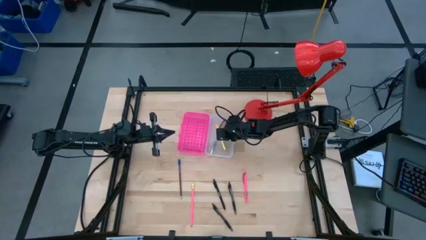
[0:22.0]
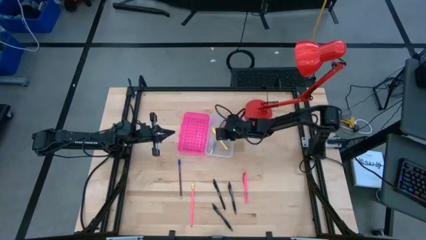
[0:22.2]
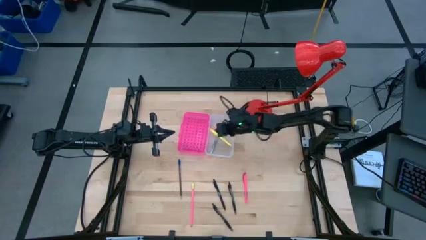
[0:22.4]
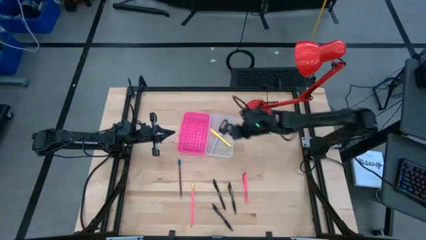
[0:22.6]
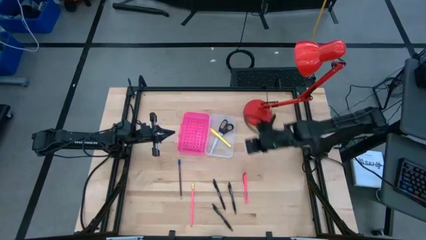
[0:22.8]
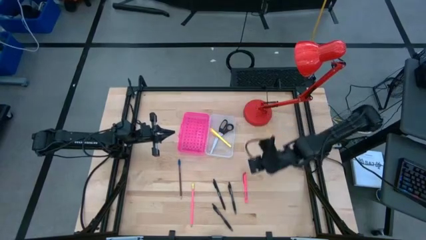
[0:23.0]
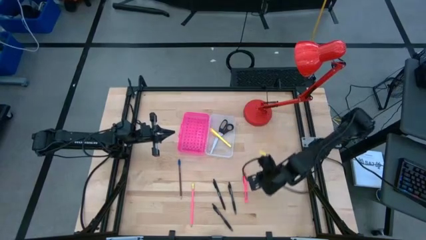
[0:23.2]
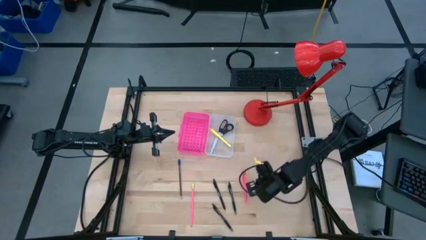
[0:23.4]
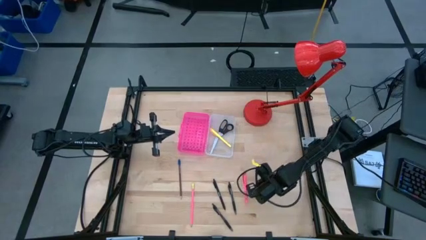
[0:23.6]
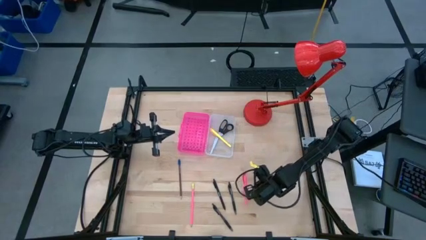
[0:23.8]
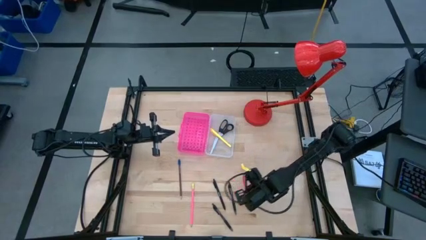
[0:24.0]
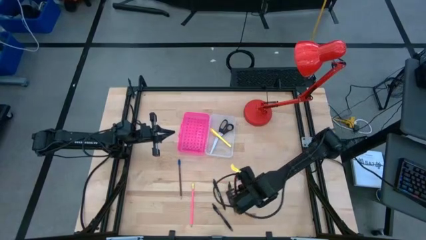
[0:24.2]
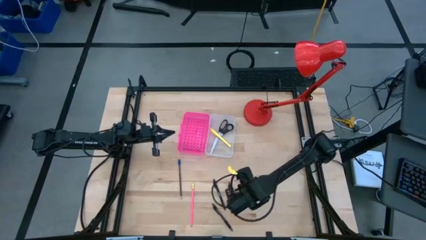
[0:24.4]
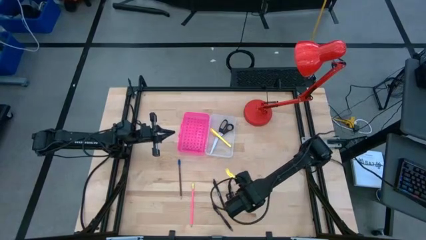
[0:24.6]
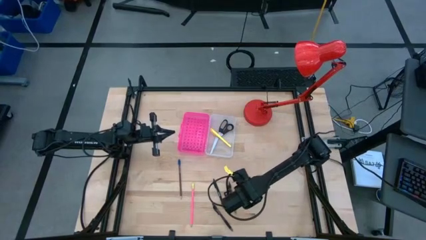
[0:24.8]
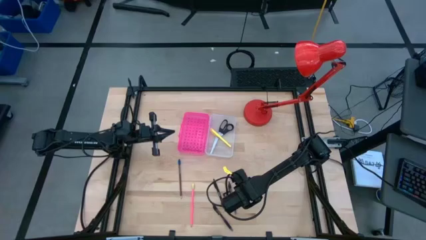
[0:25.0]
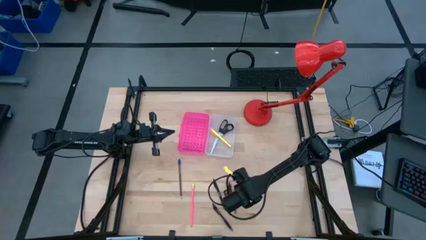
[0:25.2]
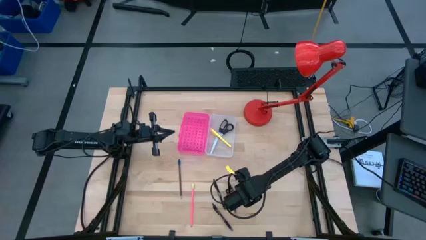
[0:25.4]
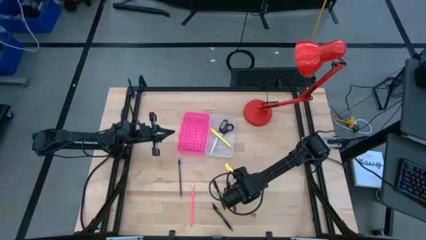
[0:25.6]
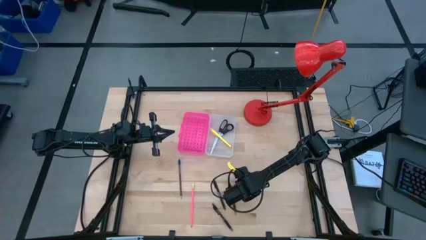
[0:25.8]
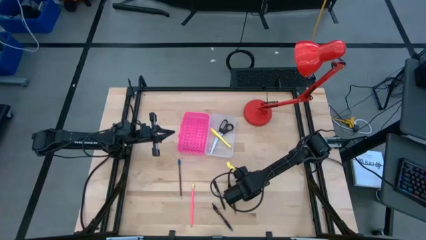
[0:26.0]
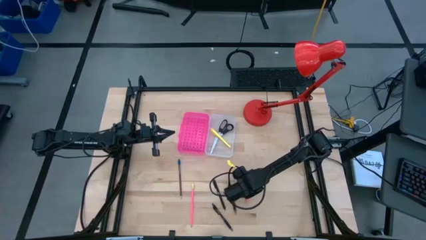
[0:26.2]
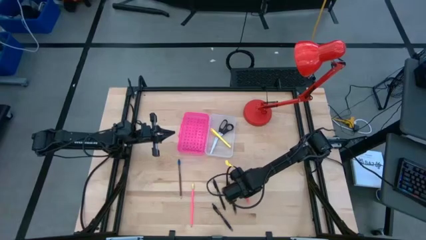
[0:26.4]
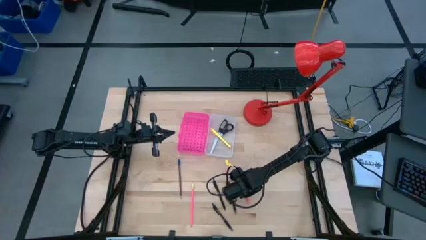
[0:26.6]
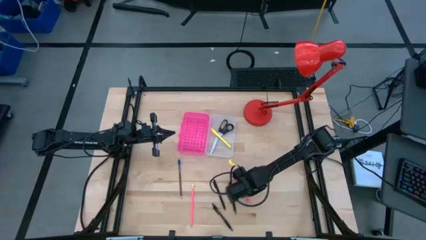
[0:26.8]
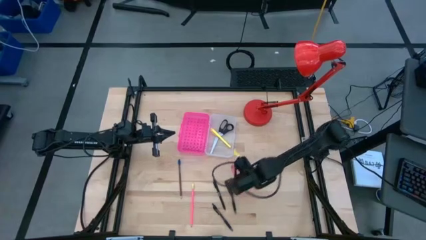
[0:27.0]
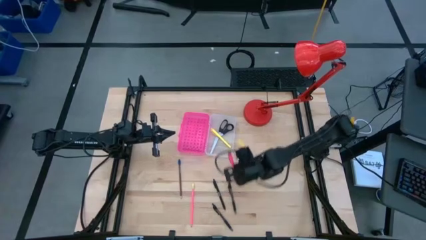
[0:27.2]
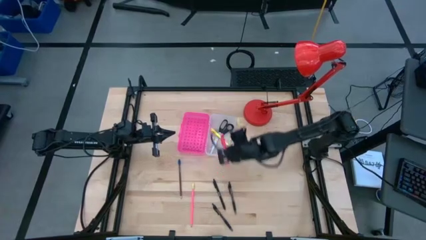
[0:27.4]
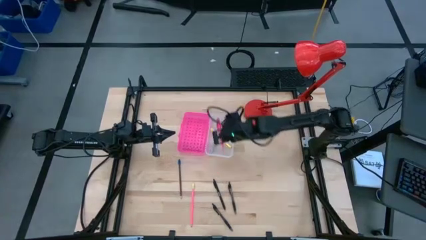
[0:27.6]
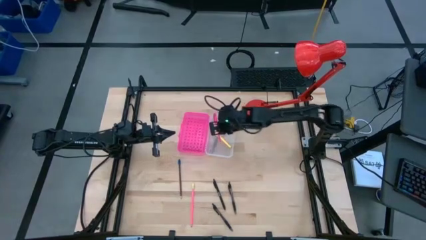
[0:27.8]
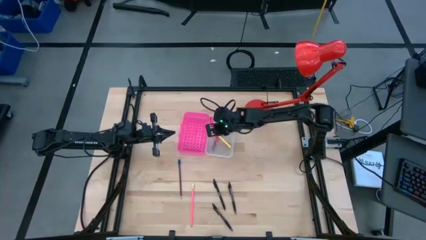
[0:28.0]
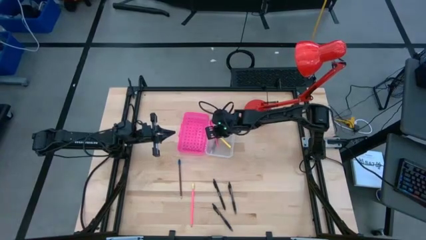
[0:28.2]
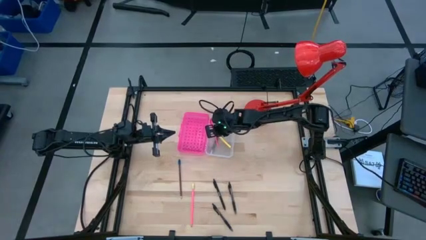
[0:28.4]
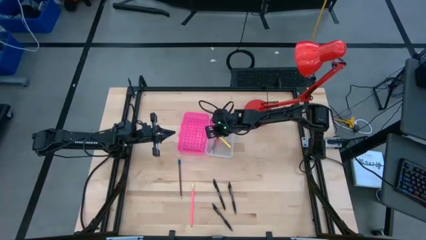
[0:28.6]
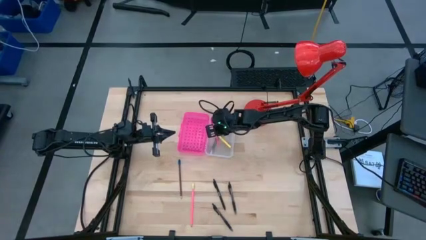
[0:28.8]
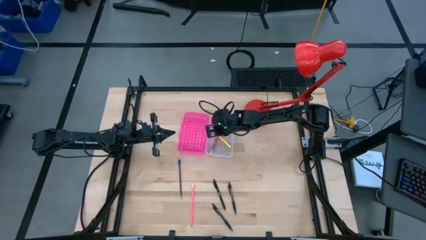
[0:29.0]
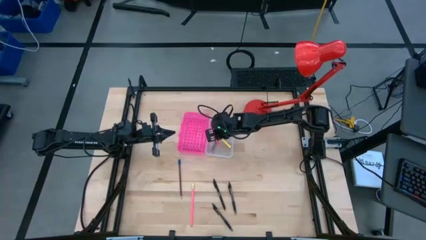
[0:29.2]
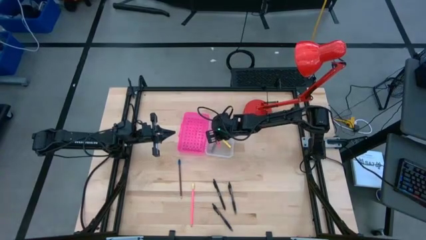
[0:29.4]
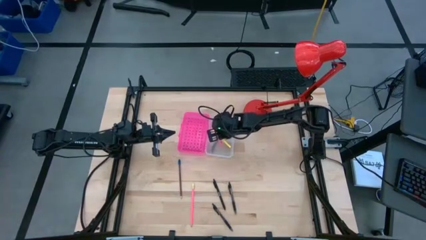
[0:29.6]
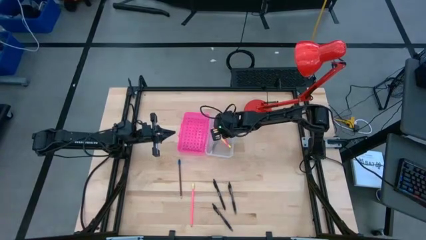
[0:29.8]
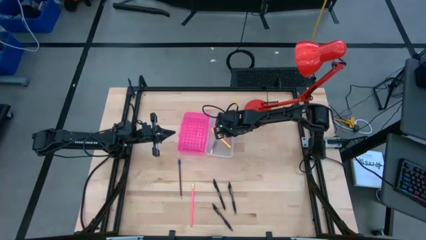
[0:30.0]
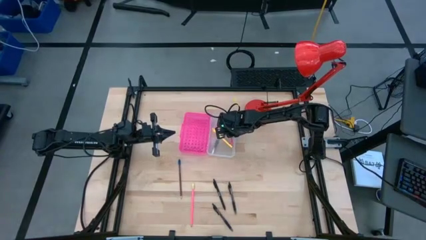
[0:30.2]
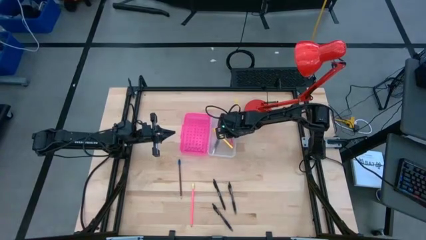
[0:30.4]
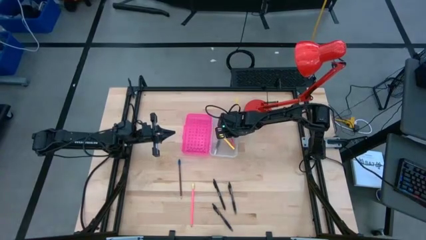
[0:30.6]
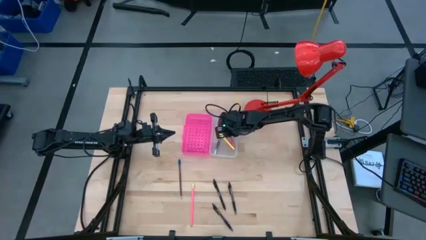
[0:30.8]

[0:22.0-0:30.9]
Task: Pick & place school supplies into a supply box
Put the pink ballpen into the pink supply box

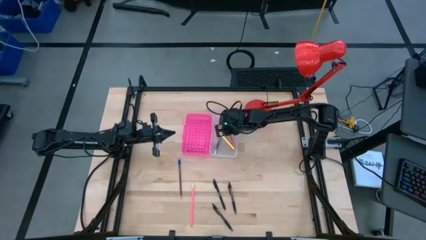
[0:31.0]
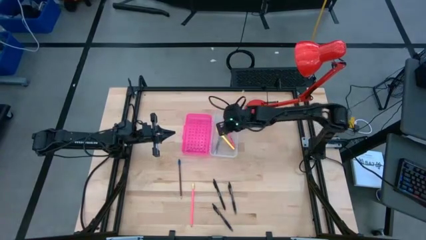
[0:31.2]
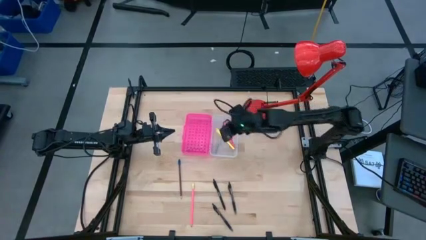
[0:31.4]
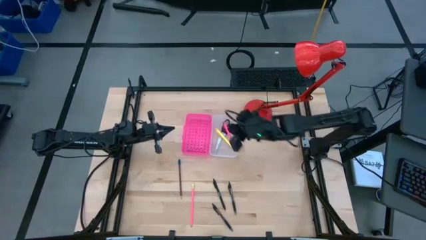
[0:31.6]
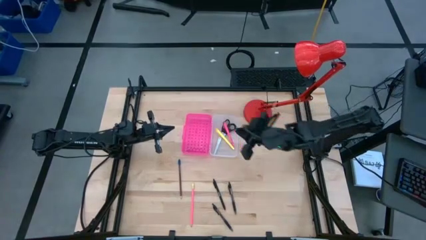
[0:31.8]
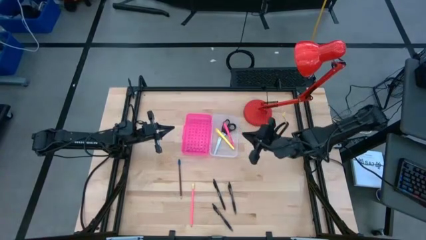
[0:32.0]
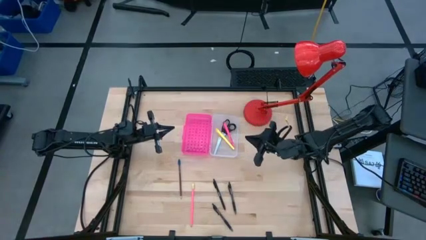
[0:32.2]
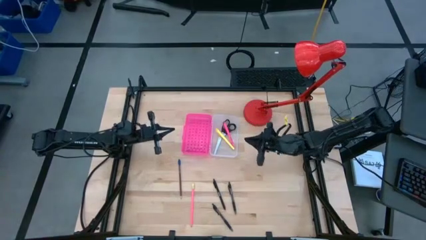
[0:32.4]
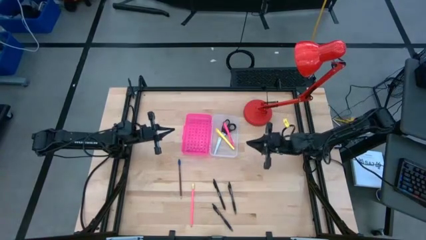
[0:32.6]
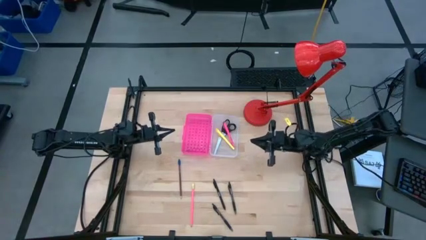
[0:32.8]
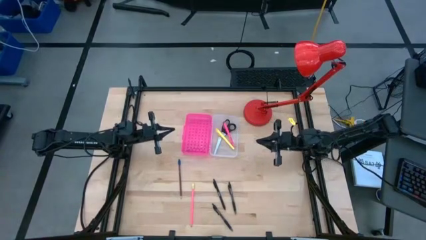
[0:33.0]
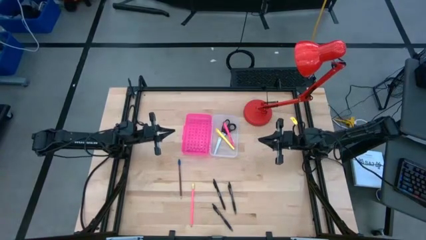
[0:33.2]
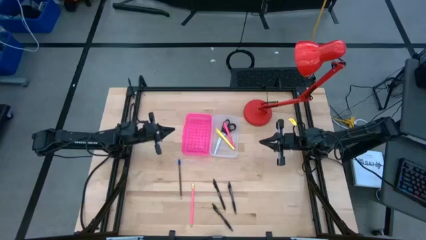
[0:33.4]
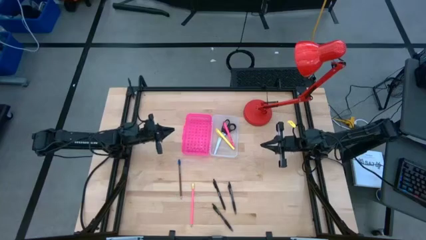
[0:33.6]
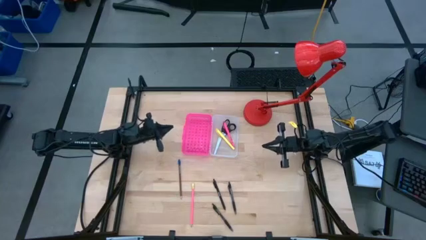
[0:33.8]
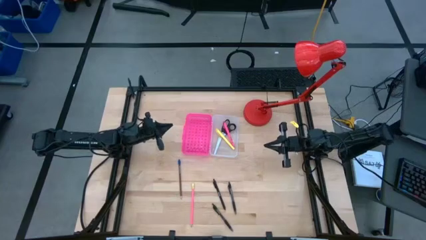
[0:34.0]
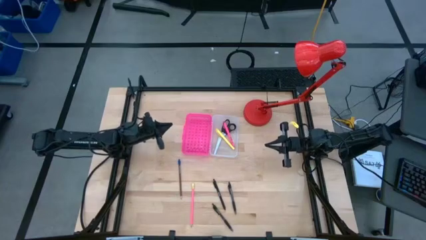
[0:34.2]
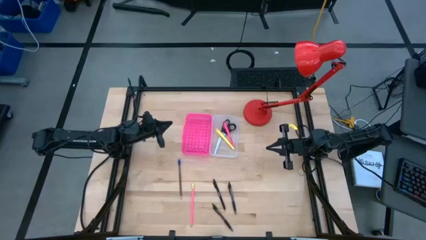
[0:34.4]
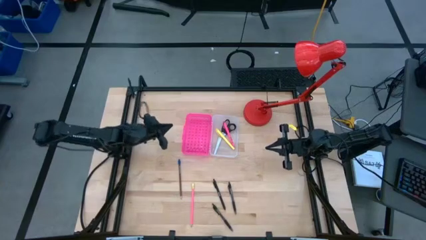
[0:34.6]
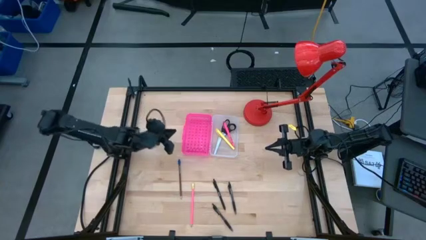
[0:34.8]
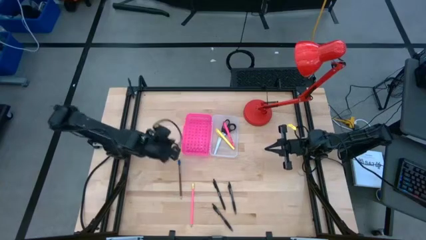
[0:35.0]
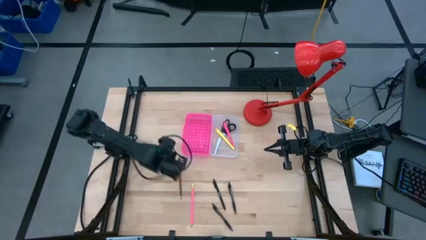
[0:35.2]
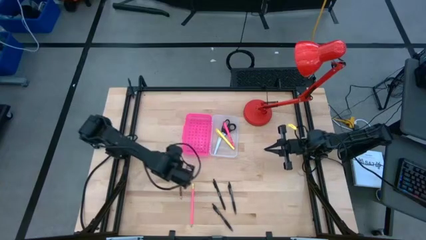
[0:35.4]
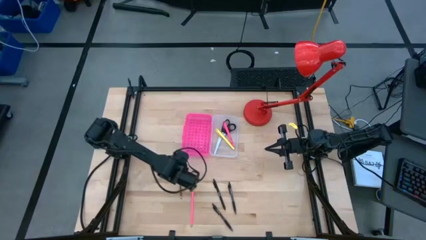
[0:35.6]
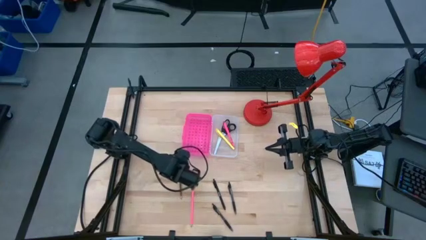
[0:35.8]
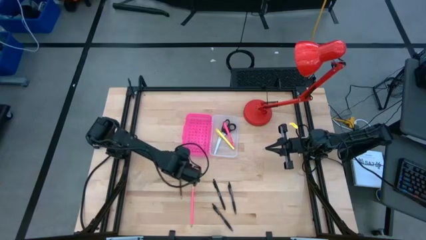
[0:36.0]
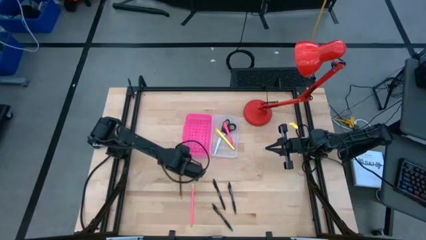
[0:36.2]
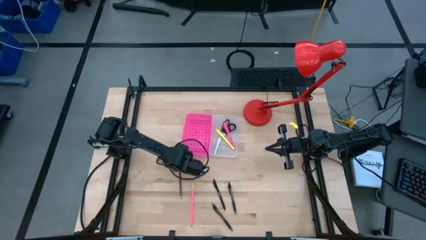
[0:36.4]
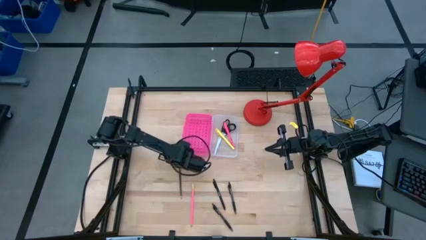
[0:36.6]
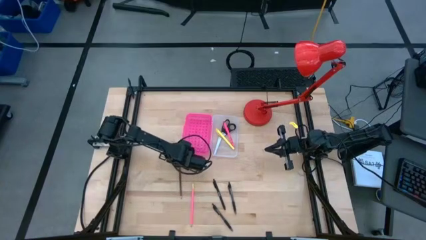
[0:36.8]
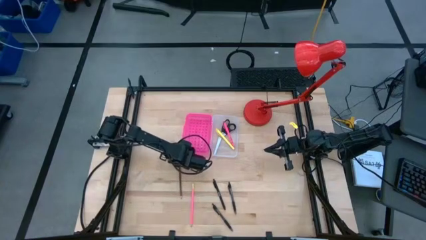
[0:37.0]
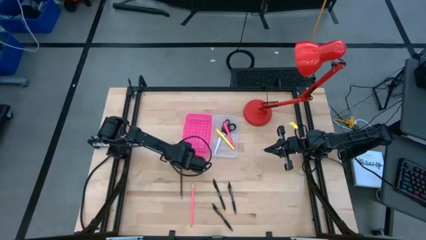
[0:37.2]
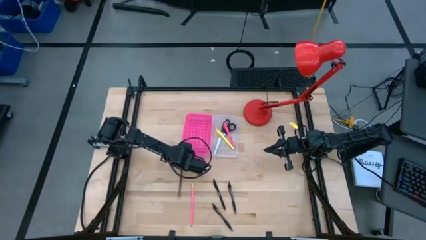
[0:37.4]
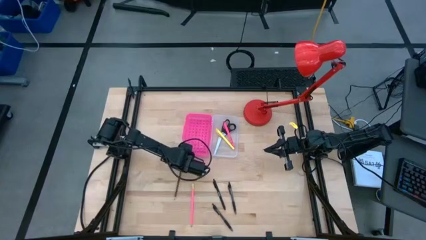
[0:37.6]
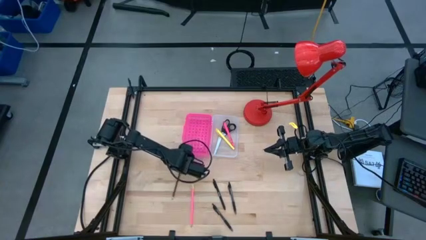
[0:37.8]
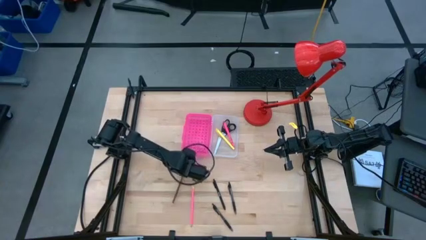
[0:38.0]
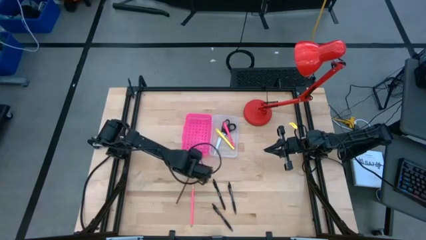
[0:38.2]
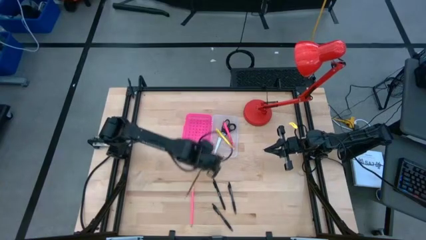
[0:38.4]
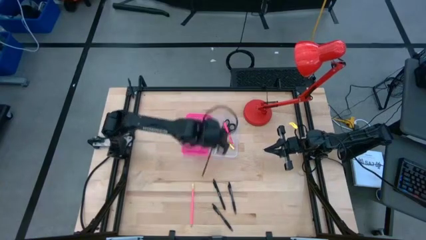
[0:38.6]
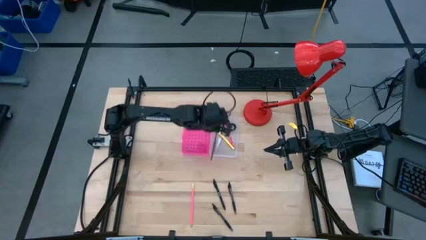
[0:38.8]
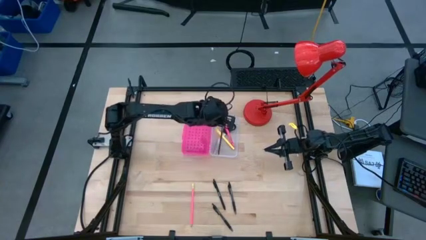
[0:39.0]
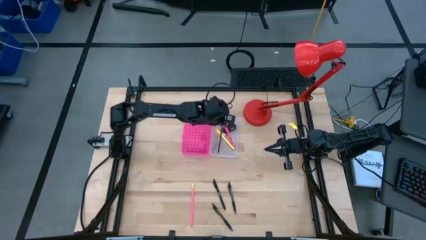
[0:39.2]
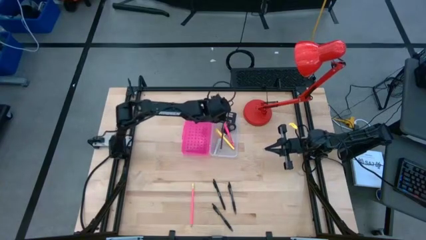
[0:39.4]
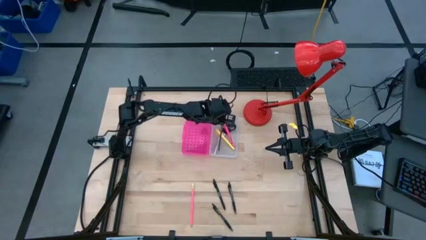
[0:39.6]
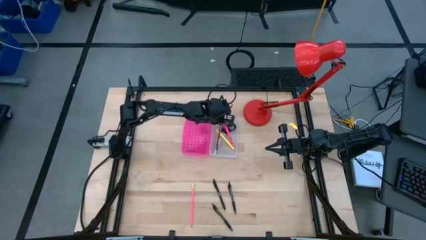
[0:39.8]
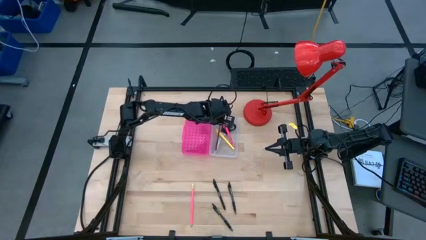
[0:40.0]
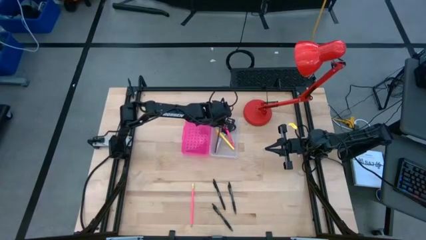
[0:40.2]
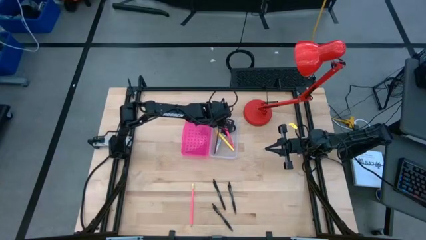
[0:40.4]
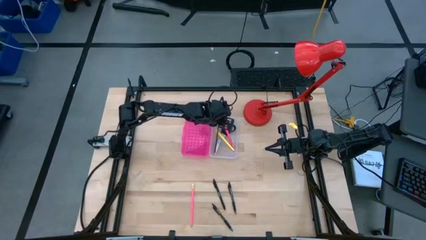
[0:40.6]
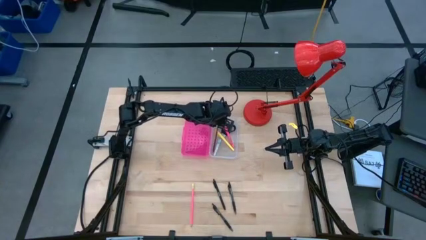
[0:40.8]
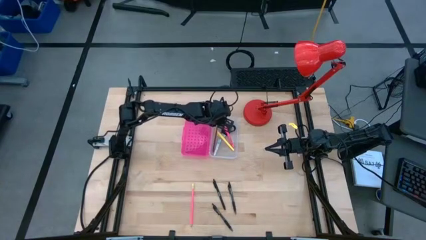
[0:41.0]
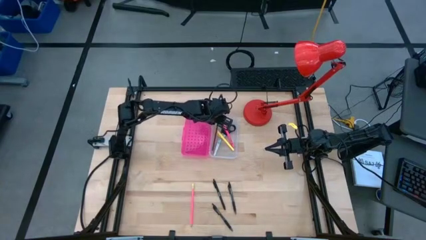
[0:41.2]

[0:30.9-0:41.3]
Put the brown supply into the pink supply box
